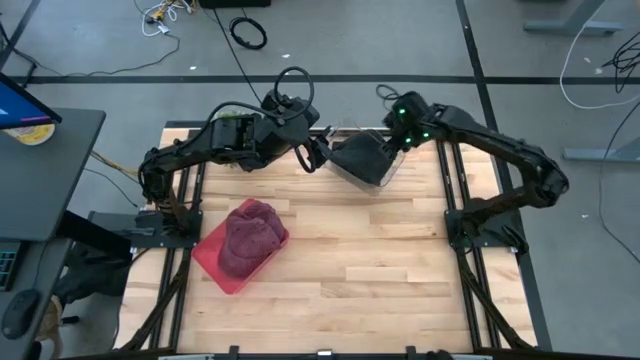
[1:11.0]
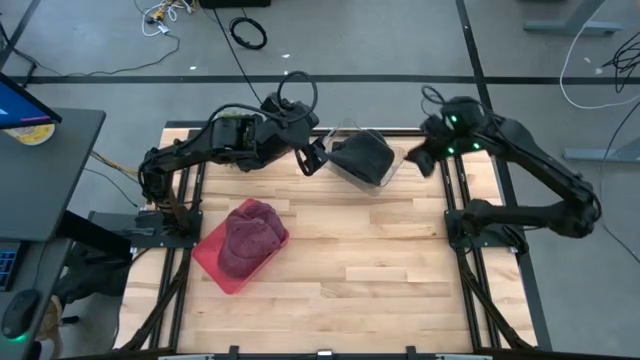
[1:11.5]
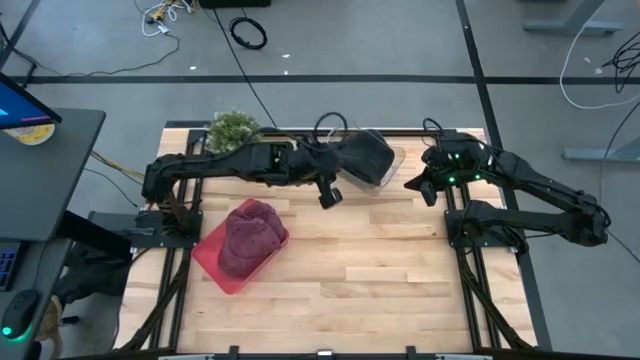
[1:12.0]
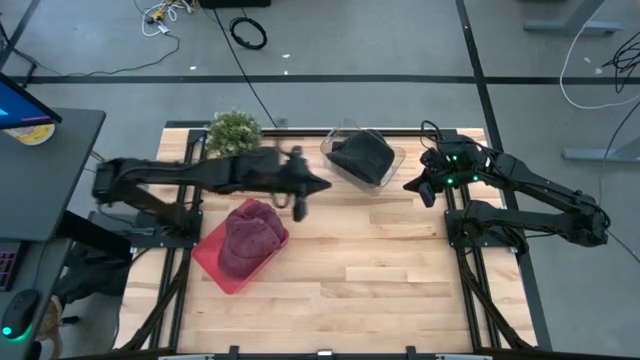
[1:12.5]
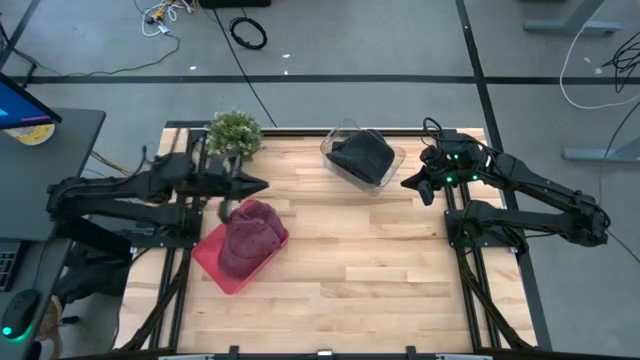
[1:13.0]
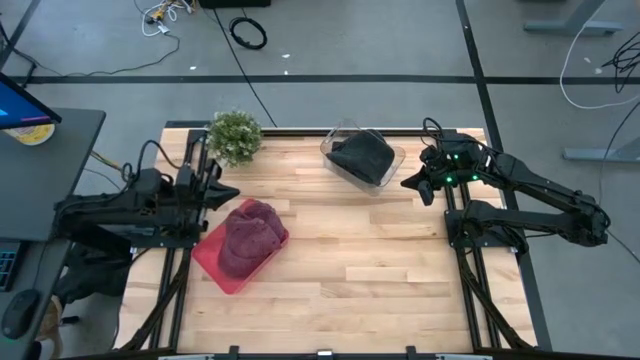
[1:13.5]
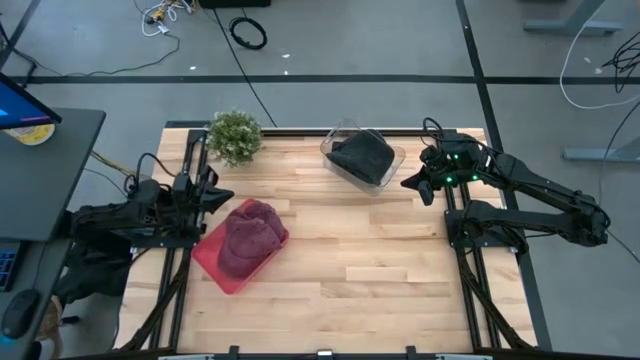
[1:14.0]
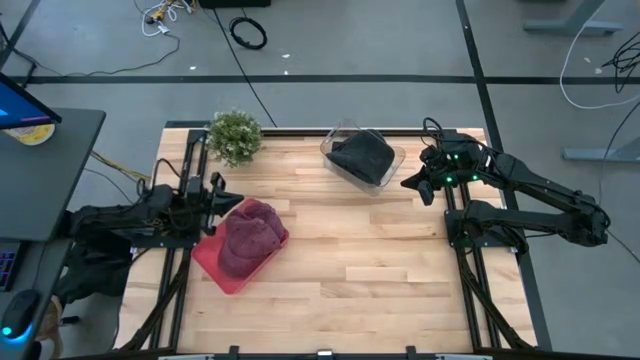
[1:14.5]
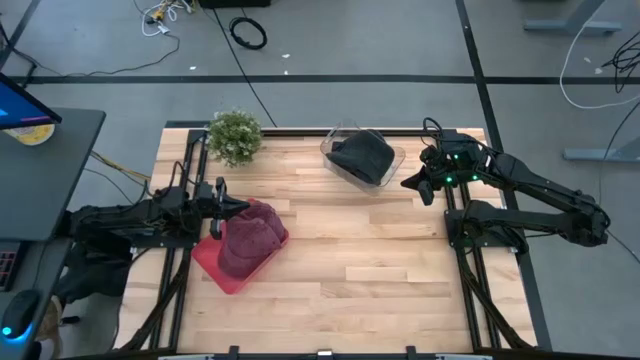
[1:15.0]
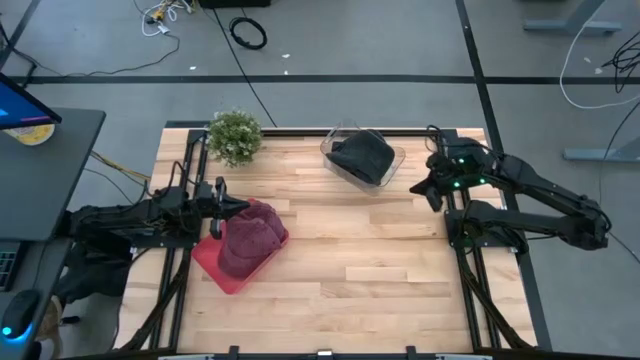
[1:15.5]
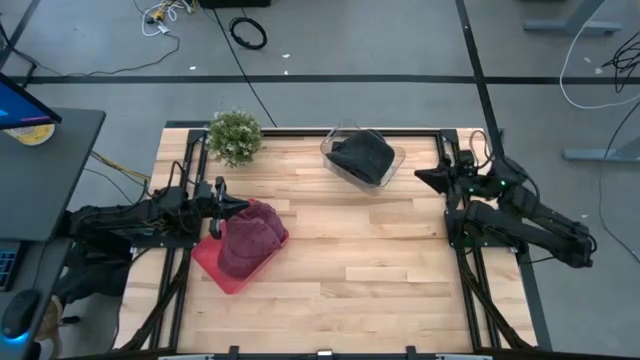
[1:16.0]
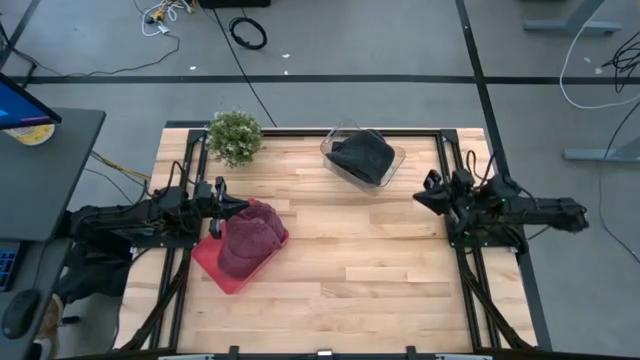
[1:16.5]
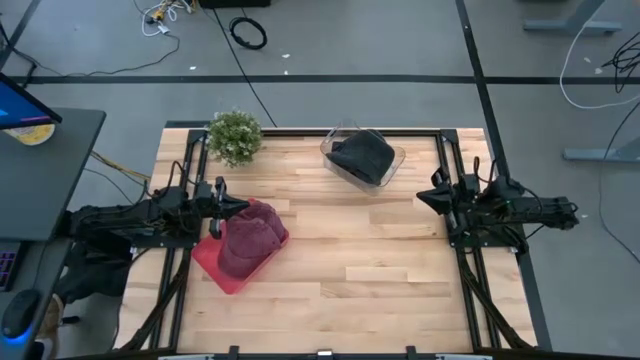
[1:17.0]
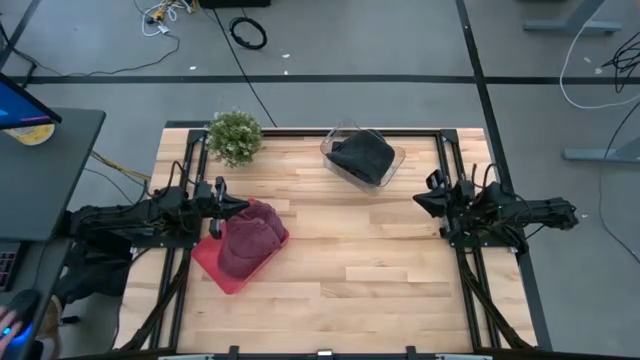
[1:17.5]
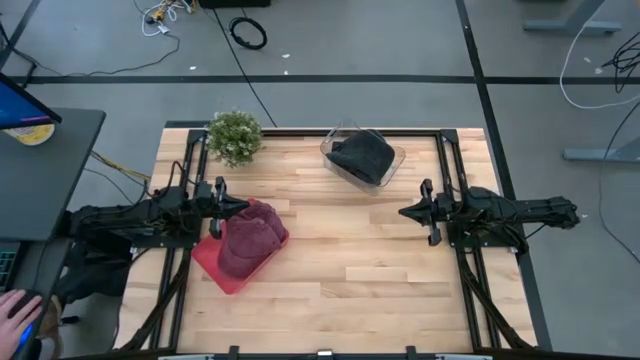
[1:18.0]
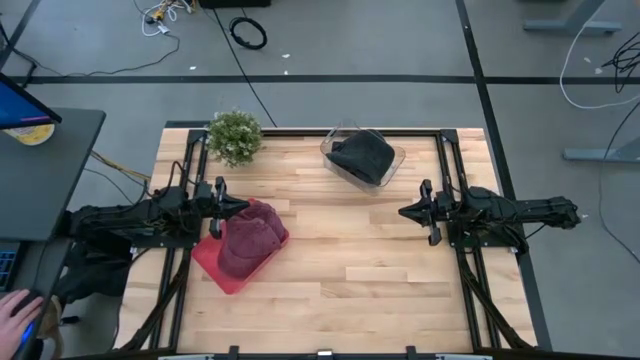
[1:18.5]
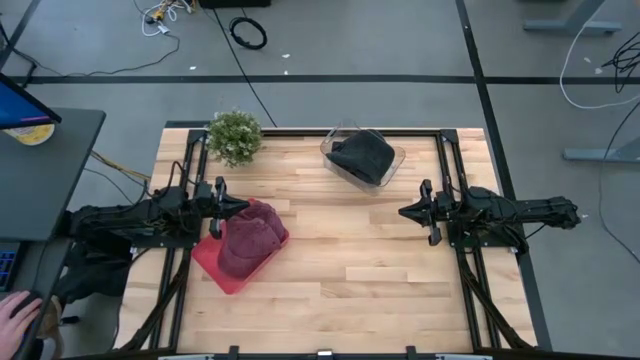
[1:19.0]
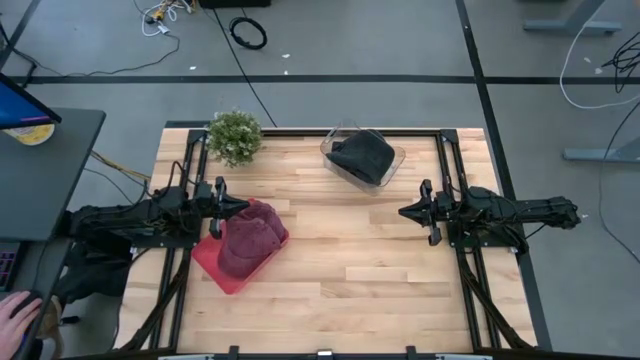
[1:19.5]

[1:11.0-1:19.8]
Task: Pick & Place hat
Return to home position

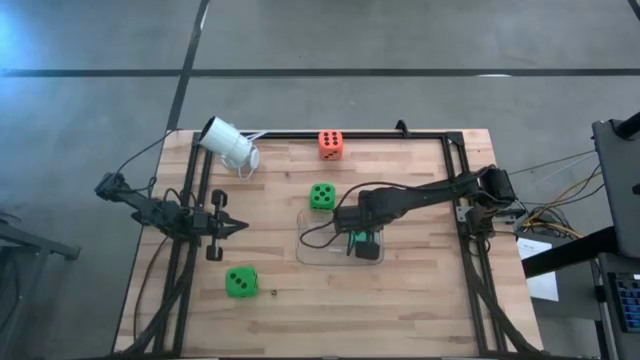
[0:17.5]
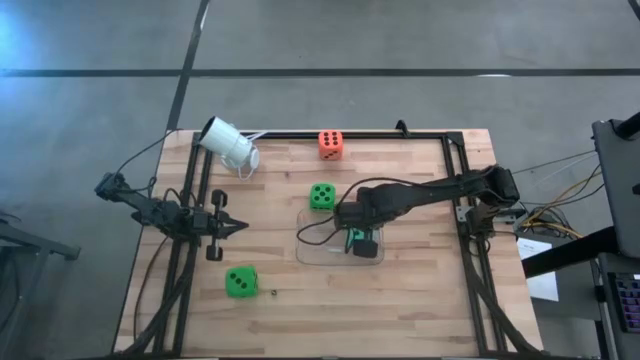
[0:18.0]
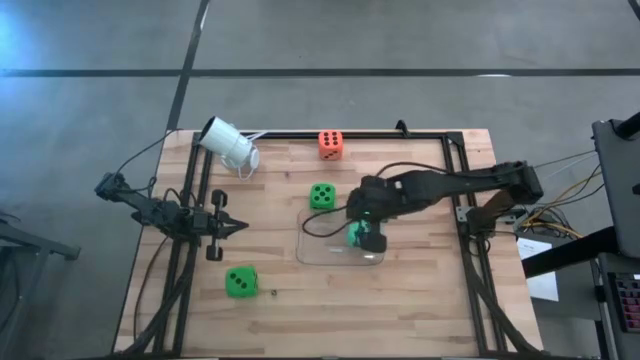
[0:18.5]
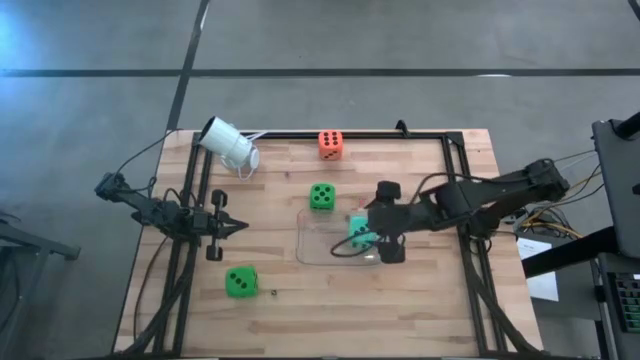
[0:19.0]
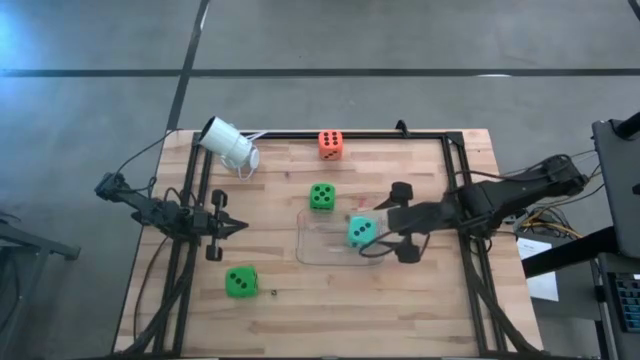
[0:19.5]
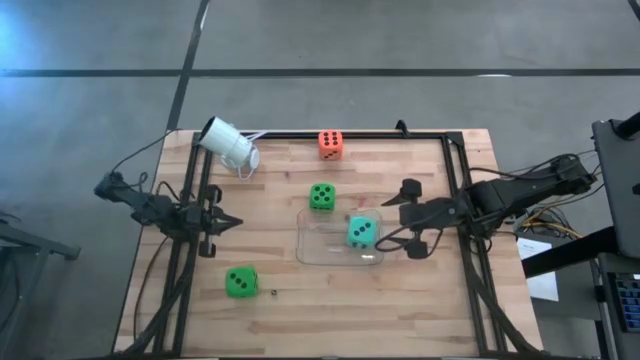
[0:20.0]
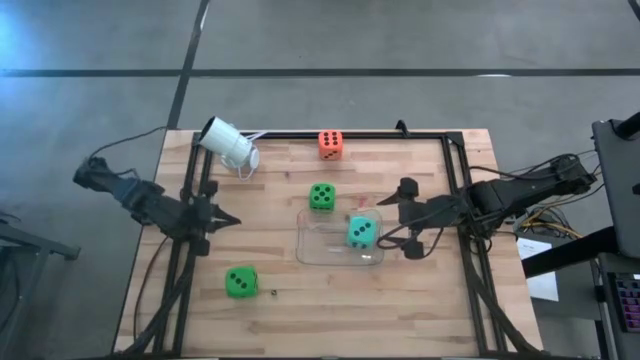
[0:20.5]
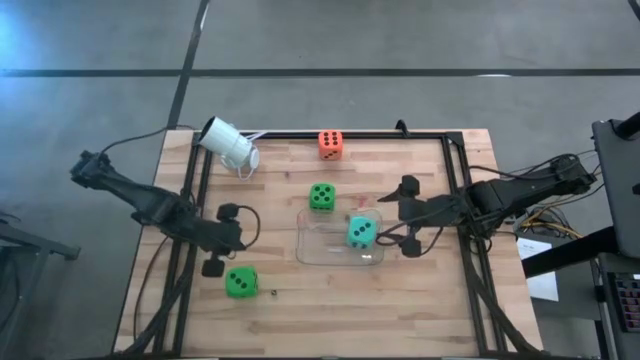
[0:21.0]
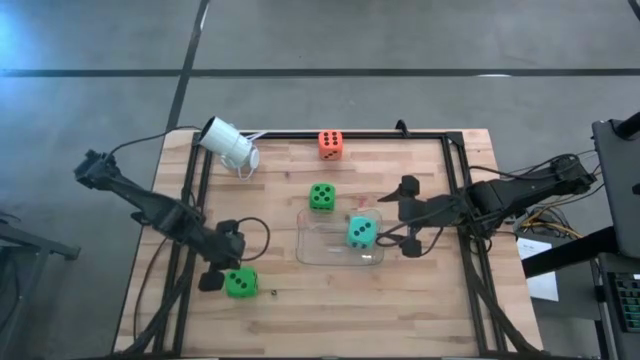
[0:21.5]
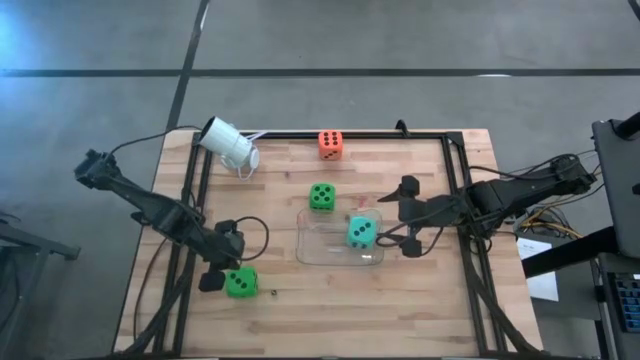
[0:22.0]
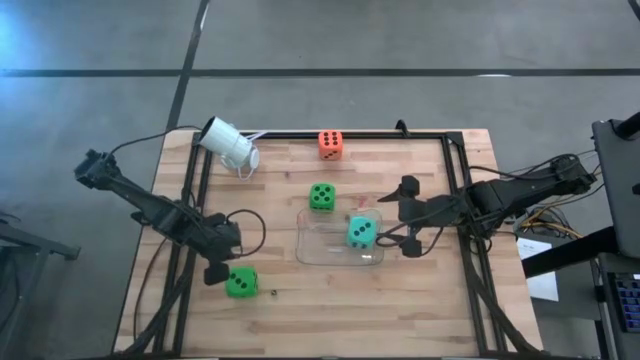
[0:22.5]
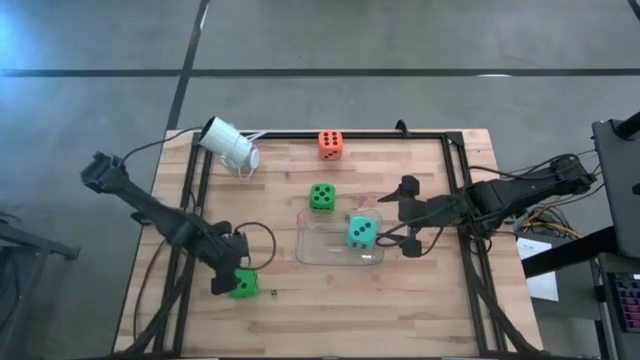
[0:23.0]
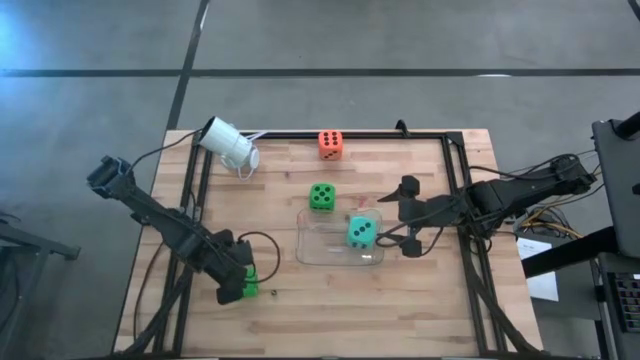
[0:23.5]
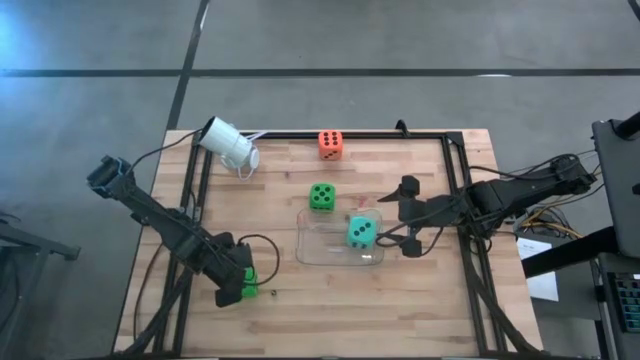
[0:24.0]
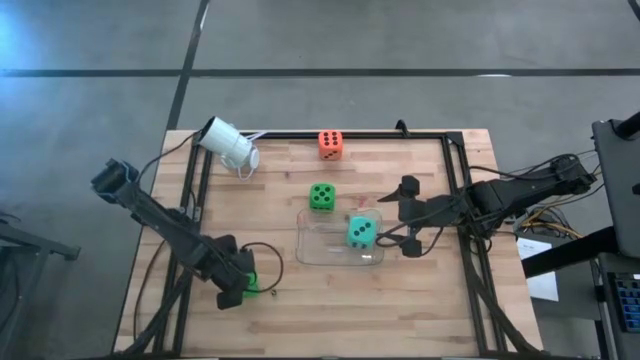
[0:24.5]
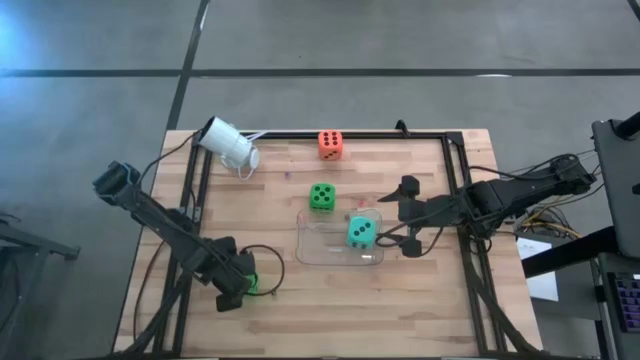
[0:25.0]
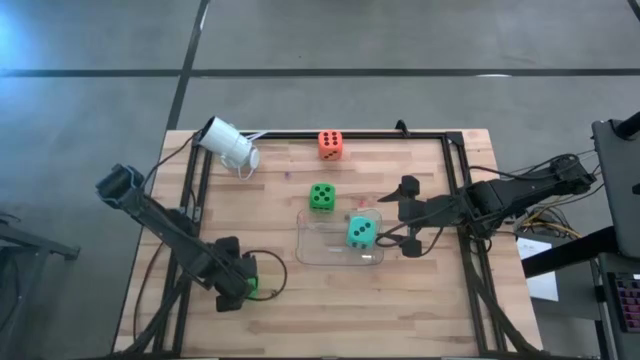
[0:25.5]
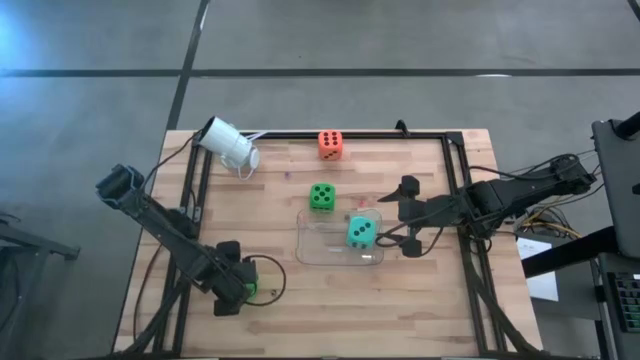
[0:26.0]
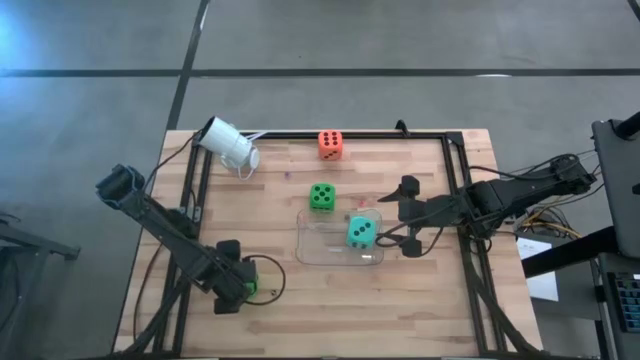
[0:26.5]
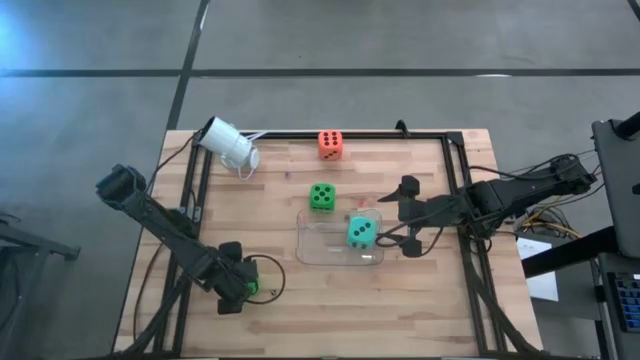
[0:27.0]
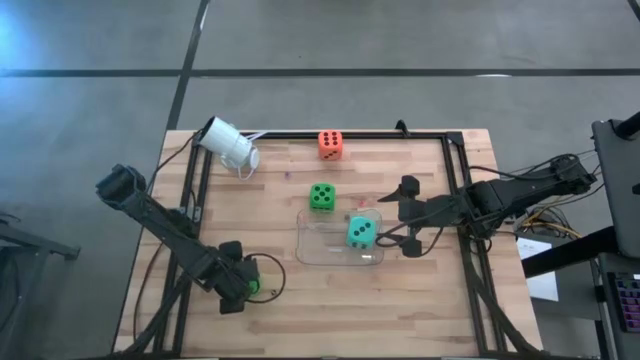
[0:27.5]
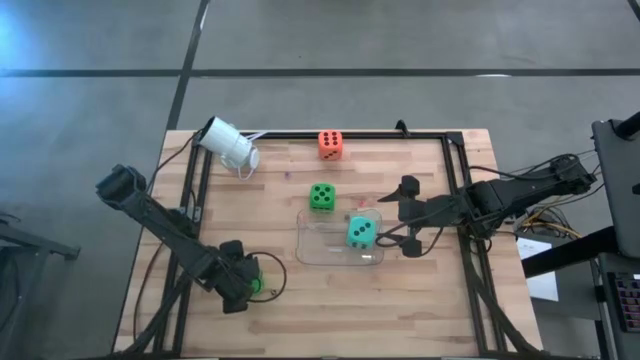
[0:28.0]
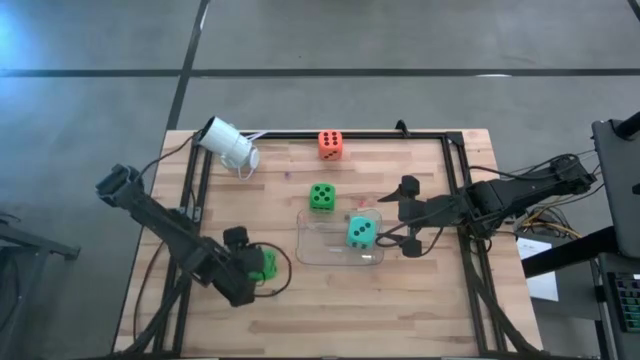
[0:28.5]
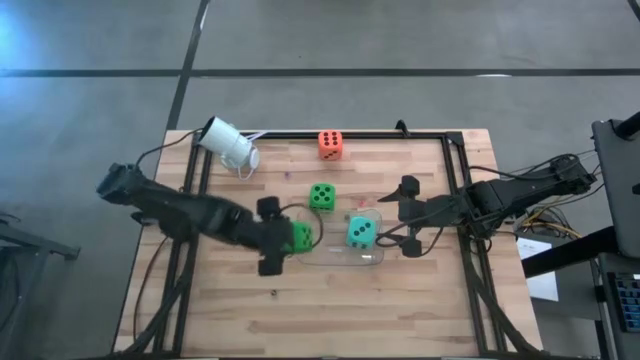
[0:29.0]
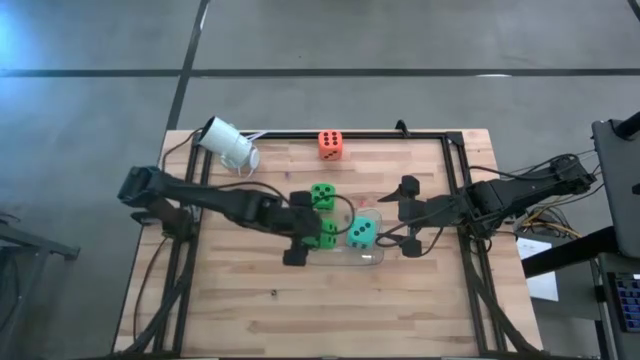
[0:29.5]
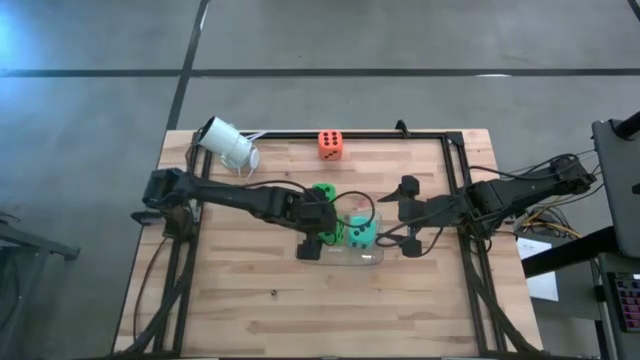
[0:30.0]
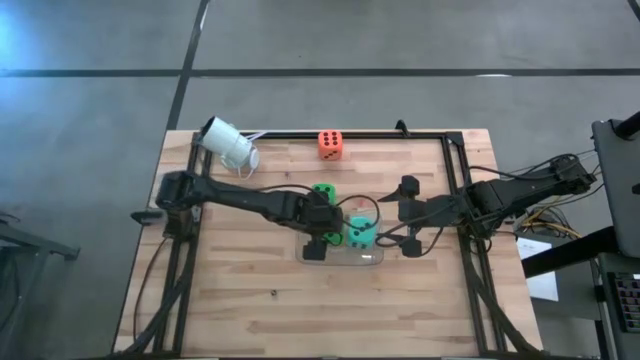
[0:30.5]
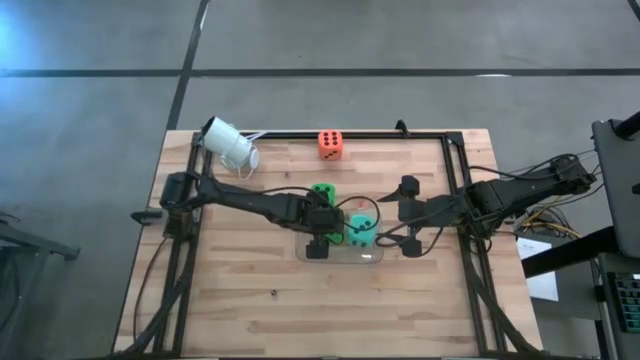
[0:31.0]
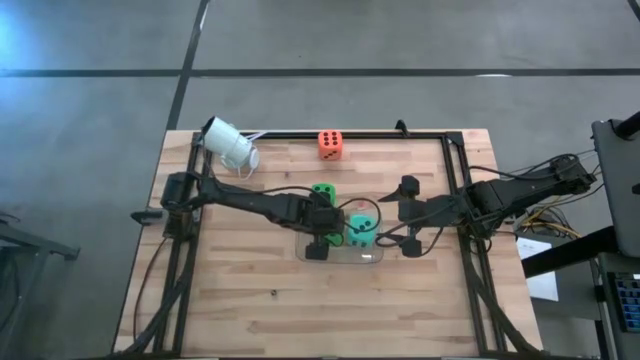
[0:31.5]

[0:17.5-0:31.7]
Task: Pick & Place Dice
Put the bottom large green die into the transparent bin
